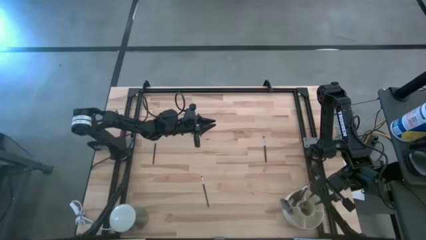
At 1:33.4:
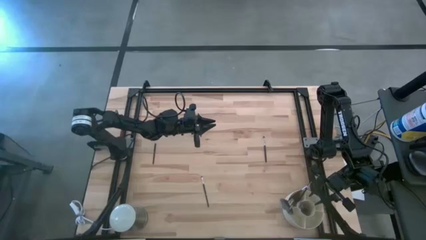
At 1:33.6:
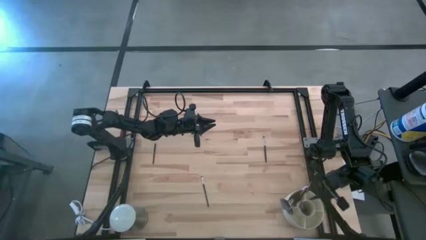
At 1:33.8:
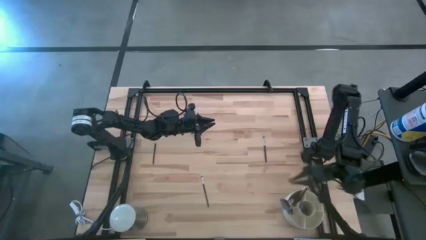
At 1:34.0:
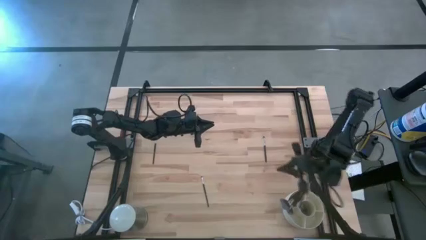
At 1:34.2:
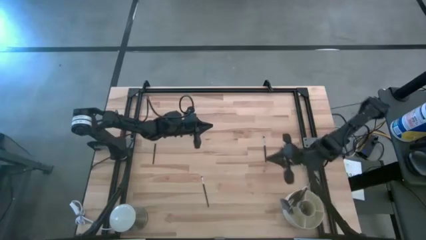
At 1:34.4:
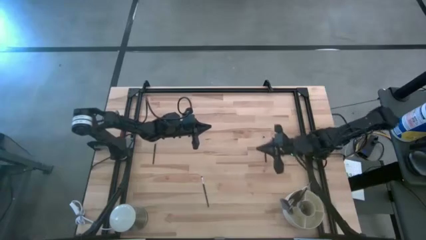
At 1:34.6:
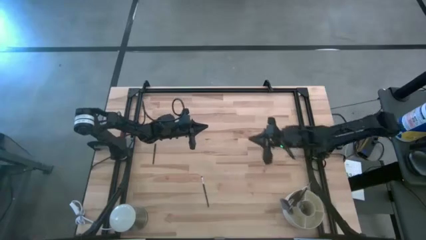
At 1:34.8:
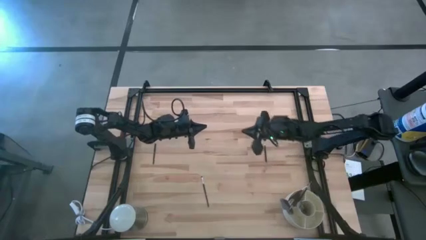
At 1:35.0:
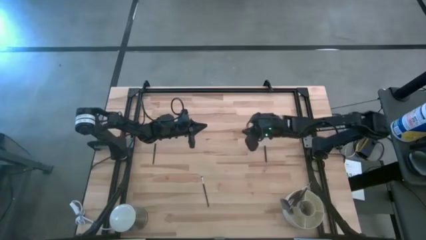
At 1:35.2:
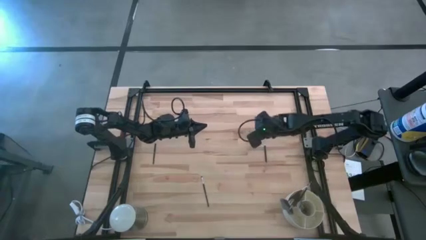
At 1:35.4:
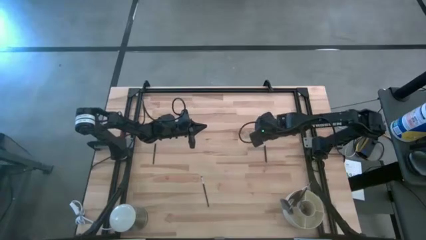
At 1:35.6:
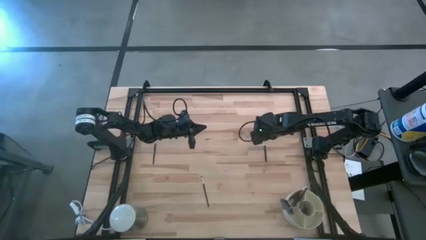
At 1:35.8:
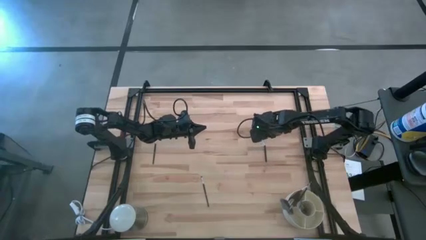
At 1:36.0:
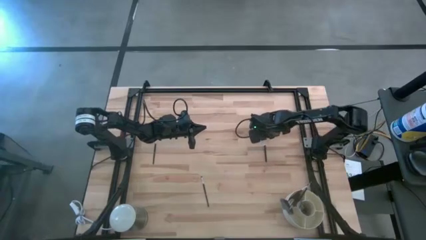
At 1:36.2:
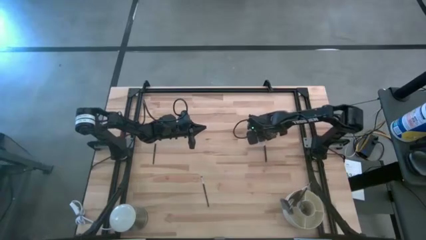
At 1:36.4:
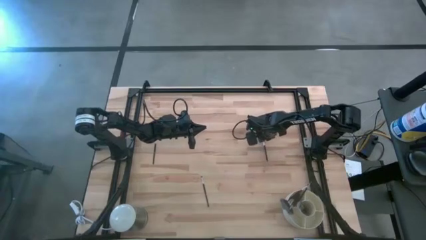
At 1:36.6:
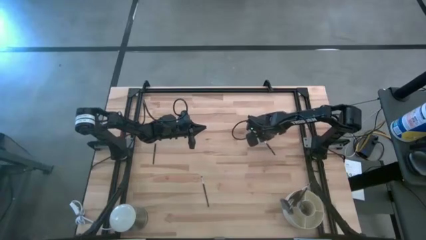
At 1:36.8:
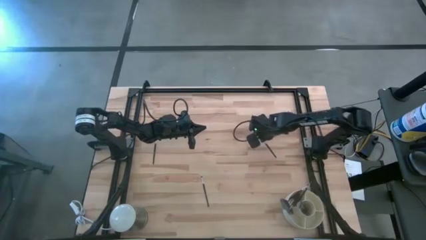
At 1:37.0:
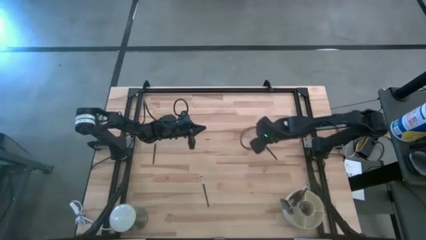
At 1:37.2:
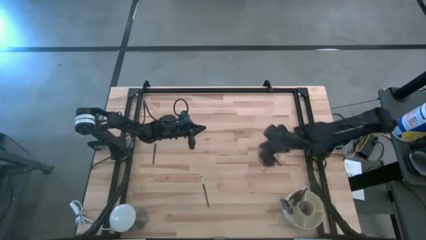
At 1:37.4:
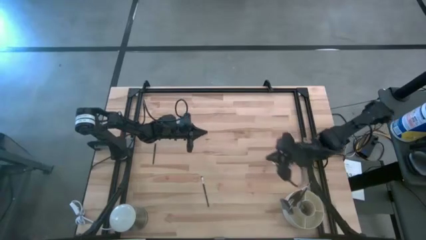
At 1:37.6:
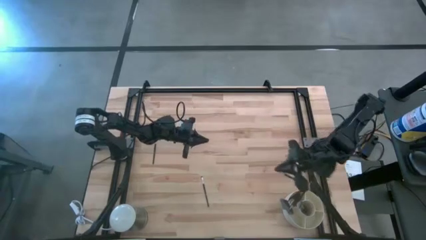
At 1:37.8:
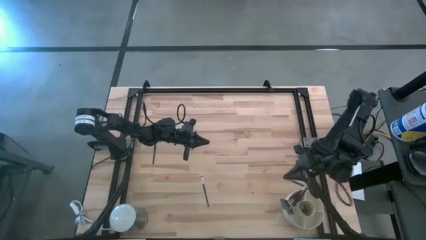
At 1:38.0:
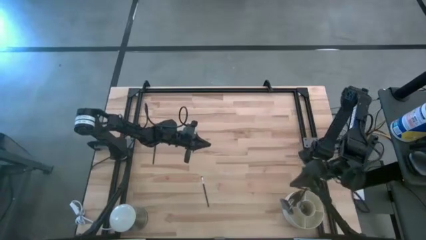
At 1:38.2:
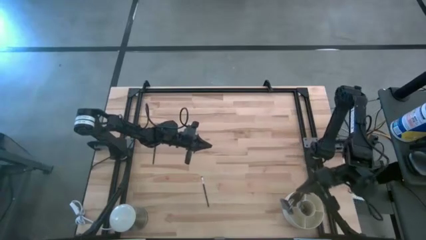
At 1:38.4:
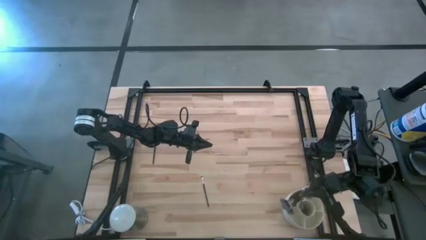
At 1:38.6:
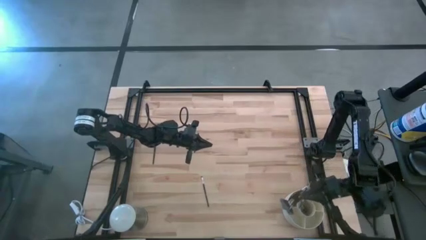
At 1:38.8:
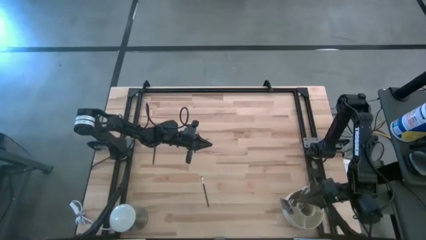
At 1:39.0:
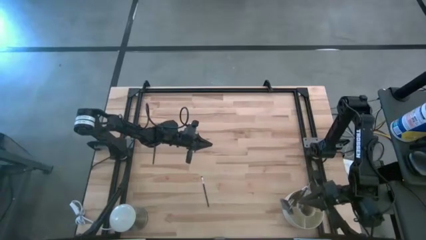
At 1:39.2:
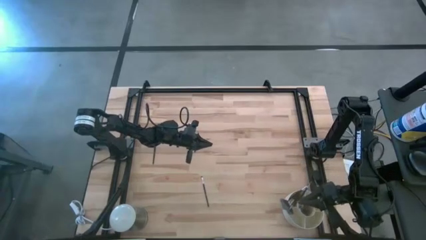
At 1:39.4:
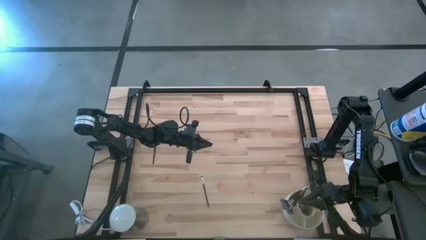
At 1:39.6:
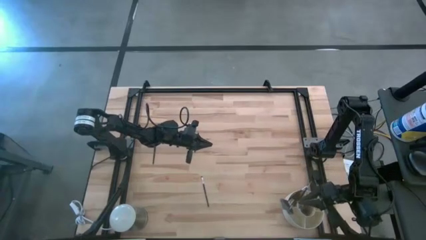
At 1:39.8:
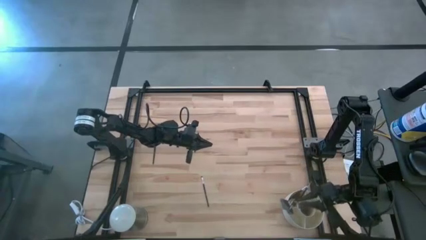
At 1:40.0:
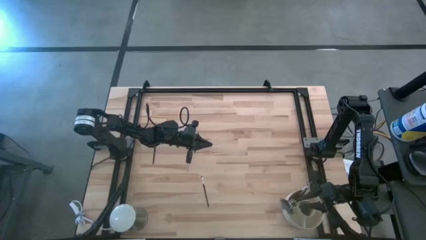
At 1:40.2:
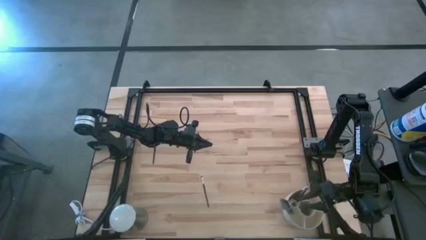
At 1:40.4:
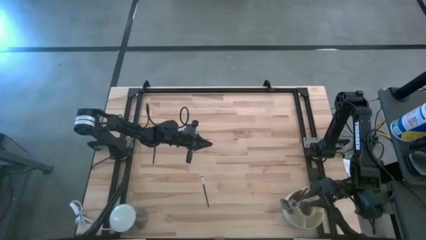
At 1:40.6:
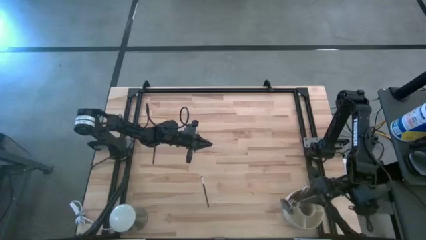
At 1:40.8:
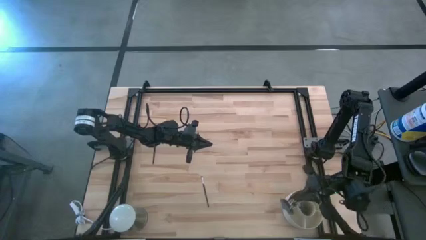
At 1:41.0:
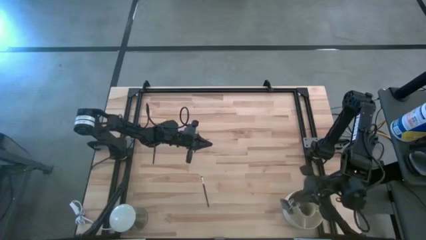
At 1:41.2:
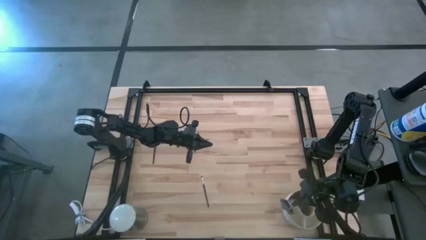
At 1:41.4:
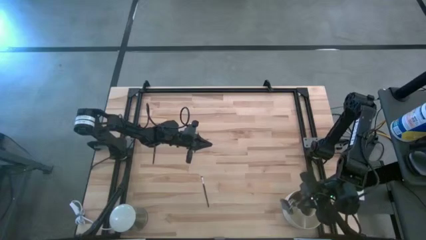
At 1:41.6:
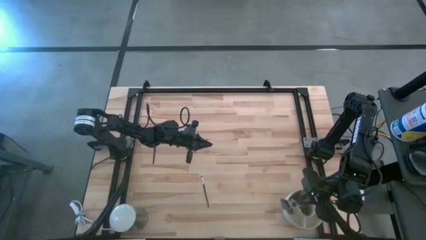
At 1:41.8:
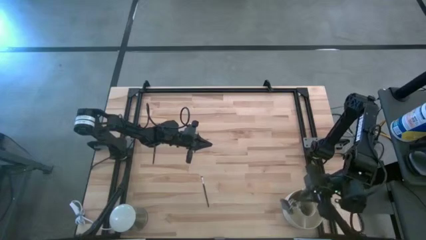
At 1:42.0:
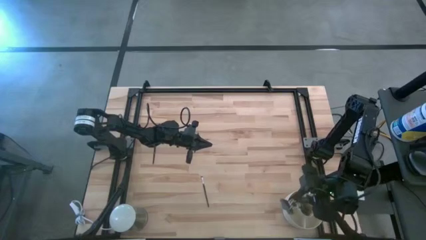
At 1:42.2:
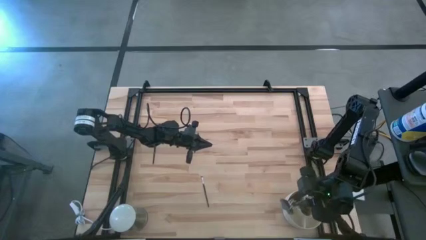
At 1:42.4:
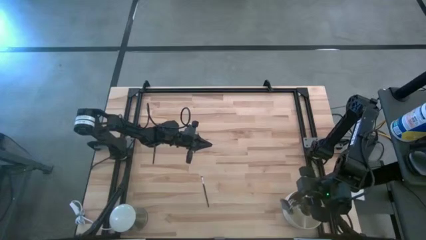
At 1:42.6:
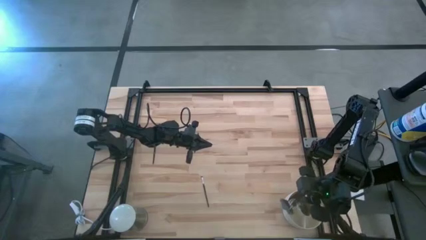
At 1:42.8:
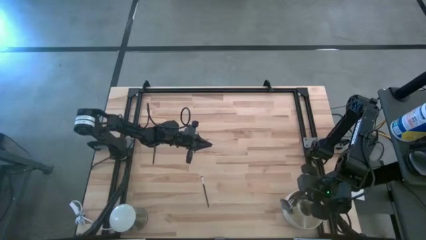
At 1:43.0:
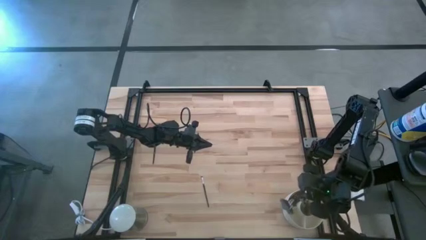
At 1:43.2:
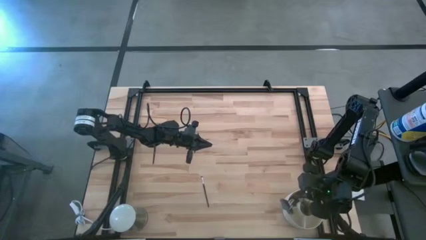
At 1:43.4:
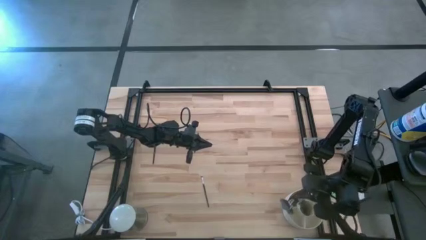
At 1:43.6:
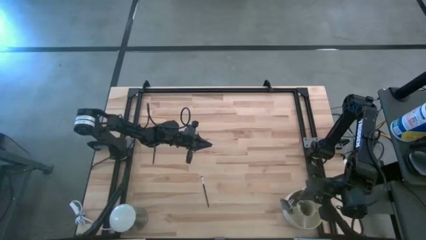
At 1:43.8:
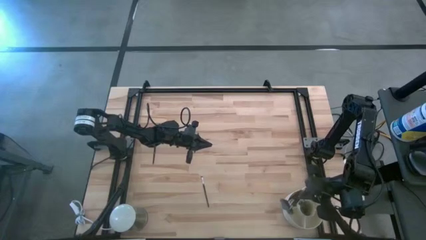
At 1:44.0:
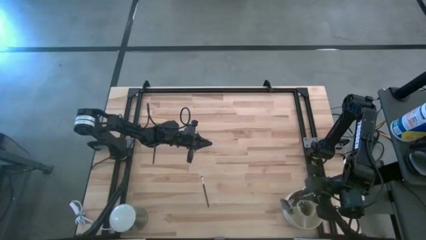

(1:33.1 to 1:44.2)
Task: Put items in baskets/containers
Put the black eyeshadow brush into the white organizer

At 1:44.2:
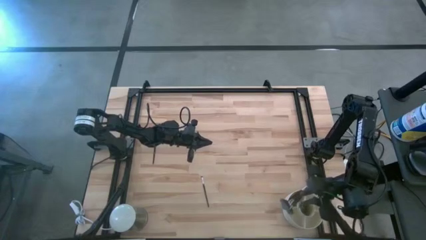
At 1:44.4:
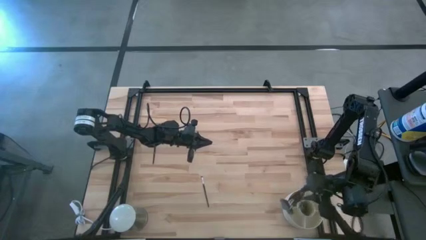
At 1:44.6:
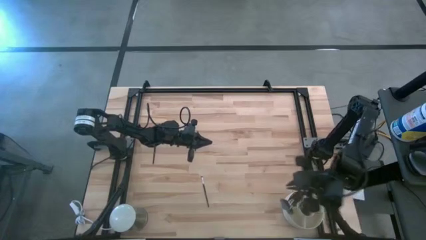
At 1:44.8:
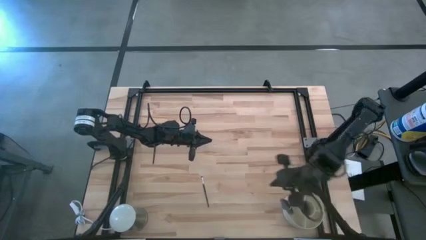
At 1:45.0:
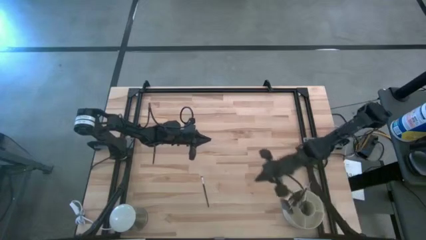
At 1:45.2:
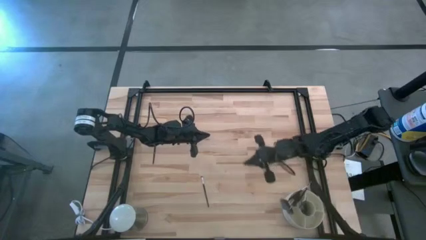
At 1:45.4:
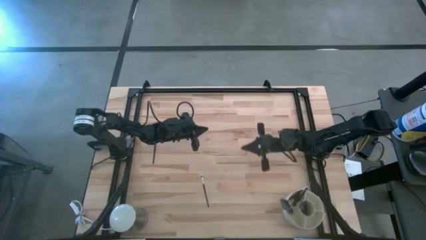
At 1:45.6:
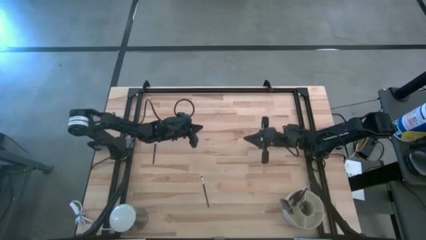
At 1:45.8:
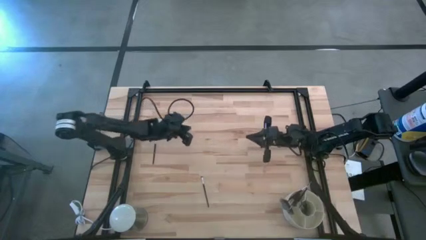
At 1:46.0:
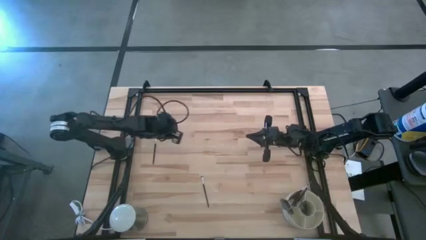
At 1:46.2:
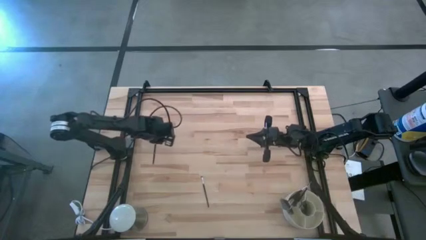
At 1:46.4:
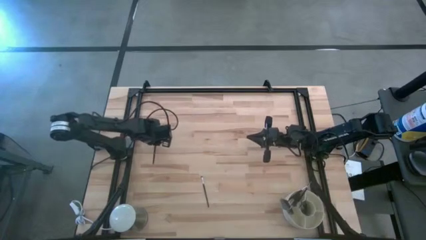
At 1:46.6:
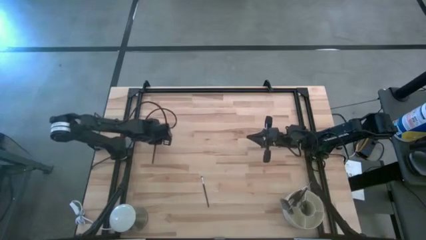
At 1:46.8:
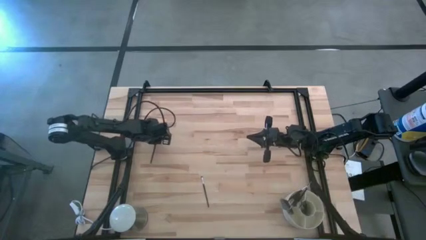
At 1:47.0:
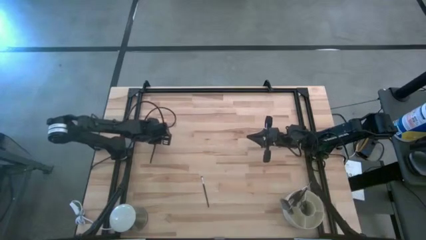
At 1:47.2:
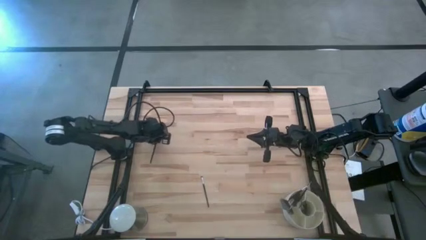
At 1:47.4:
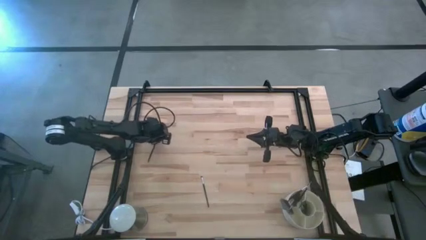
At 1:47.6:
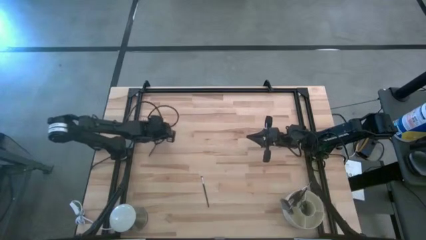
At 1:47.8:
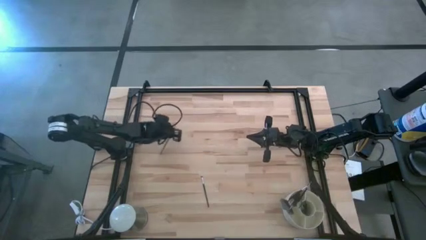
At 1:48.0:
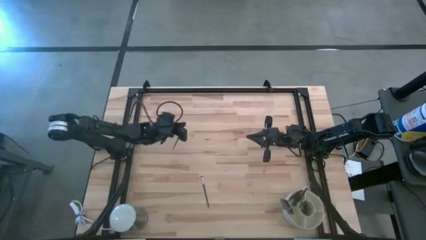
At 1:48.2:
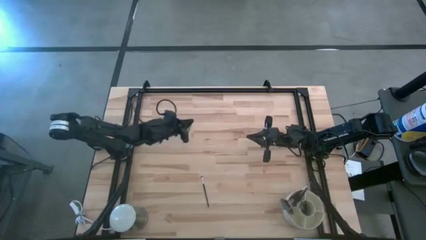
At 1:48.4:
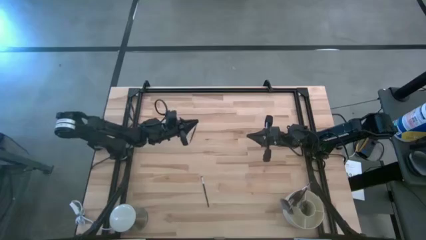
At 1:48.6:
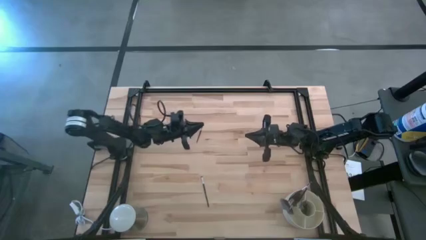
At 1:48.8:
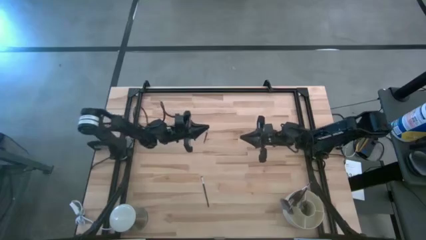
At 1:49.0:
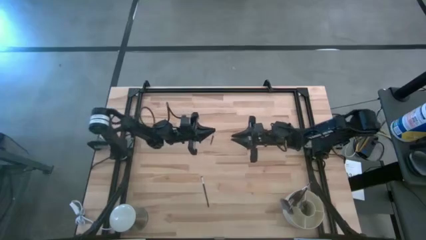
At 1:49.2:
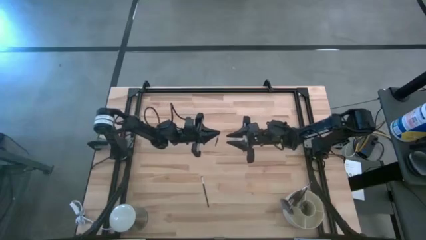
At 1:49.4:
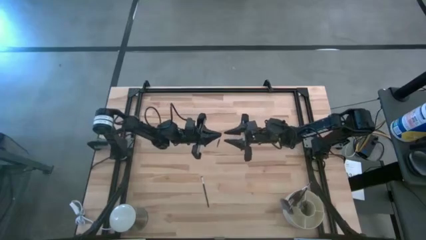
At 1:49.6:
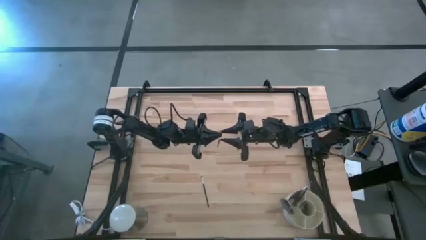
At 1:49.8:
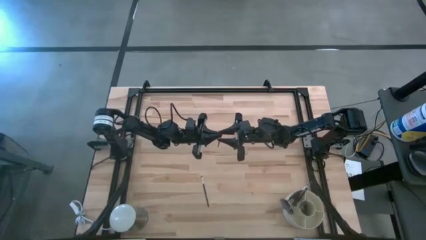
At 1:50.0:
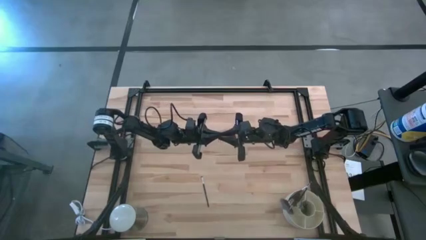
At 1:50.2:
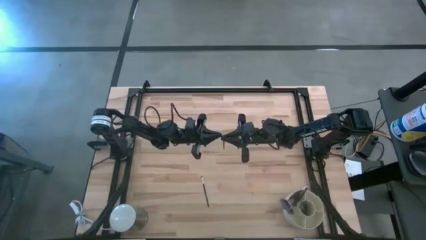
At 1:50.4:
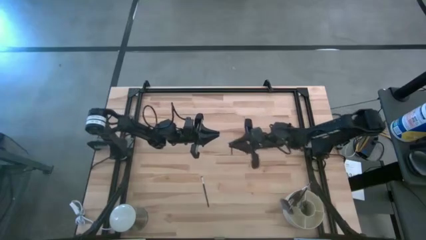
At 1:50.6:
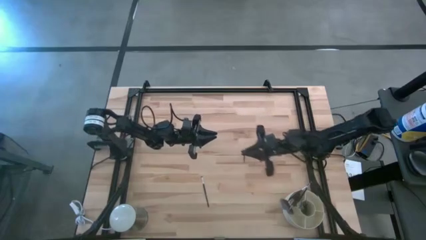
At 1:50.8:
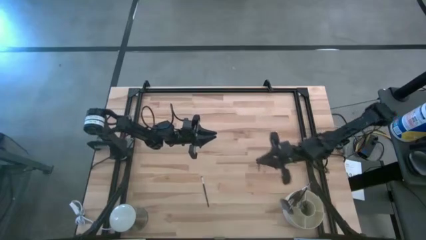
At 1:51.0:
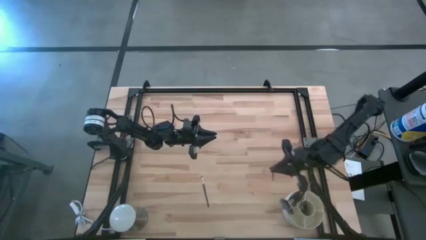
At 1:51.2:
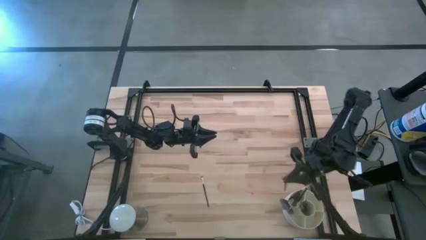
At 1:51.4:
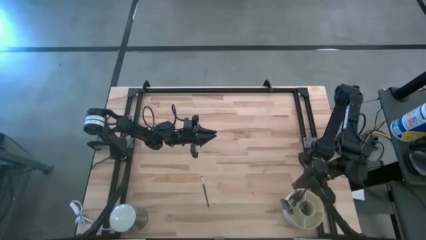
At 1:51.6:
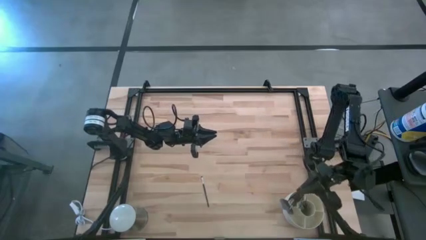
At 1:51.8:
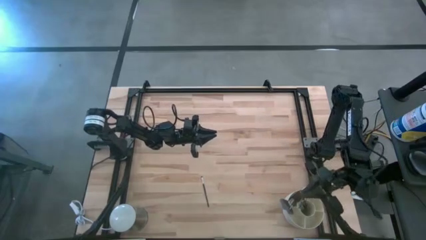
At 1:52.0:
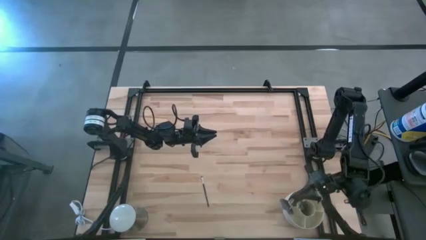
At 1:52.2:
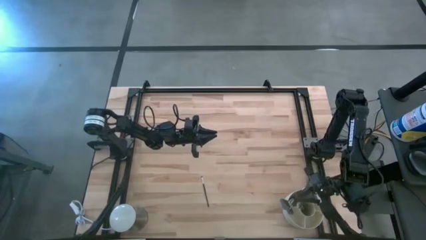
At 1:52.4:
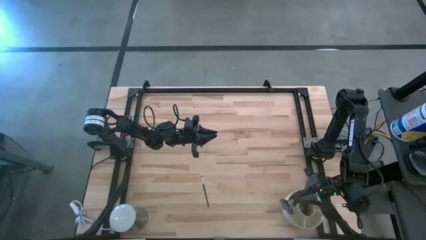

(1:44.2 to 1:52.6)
Put the black eyeshadow brush into the white organizer
